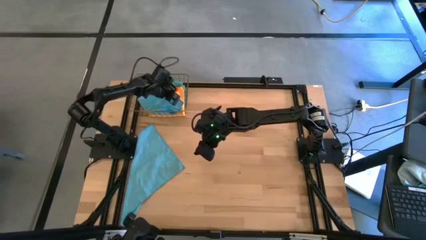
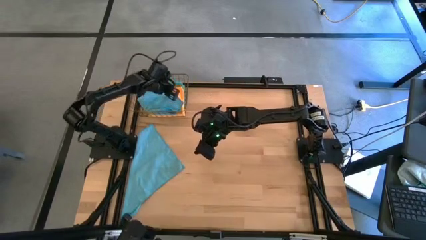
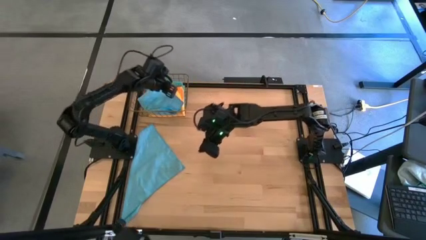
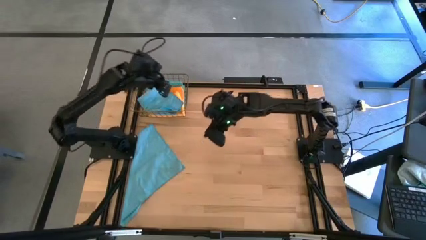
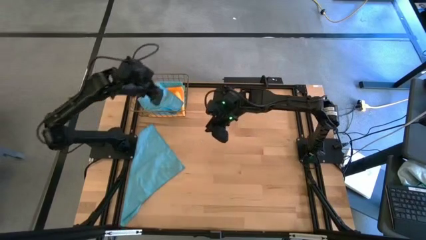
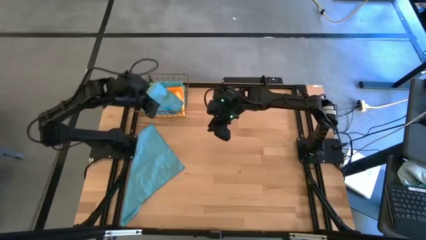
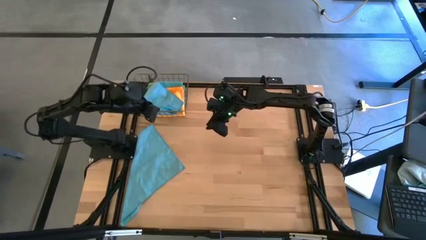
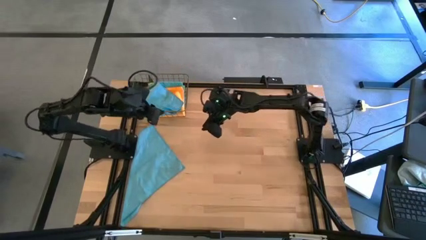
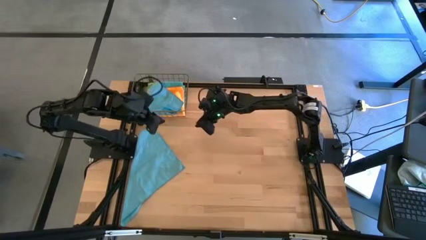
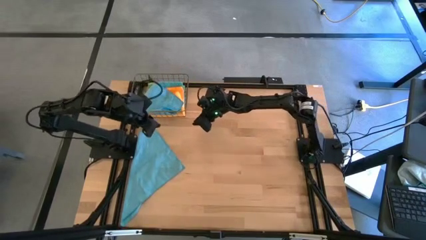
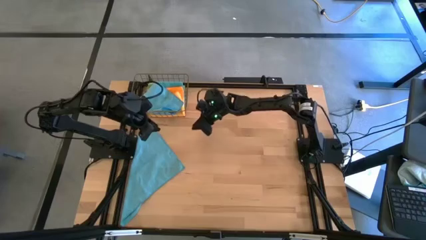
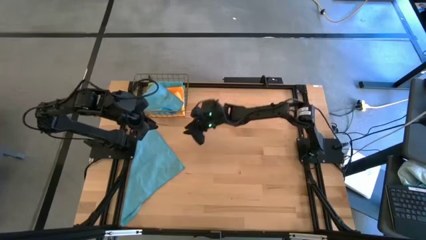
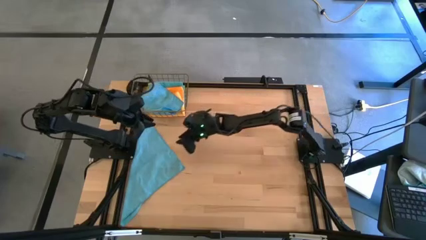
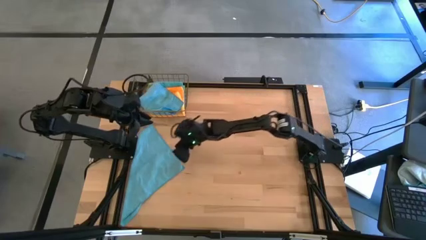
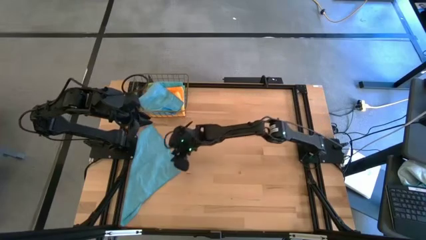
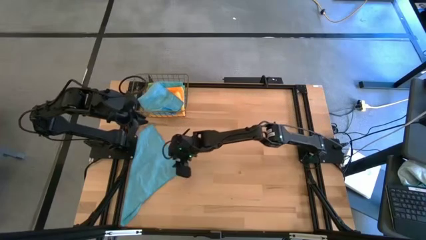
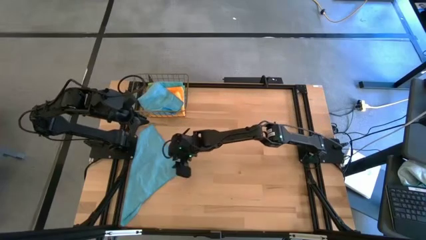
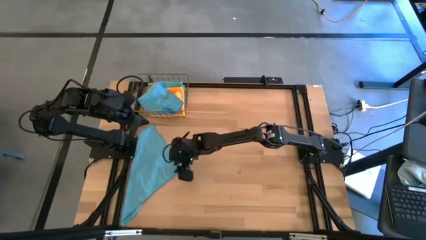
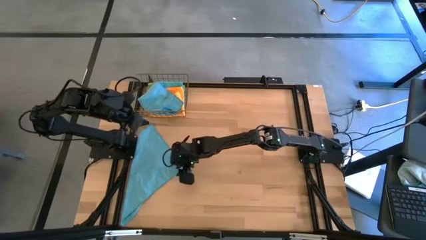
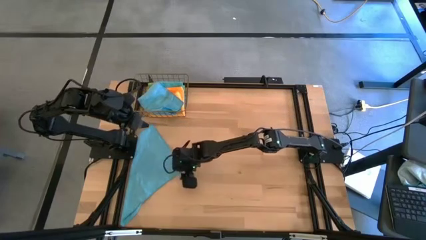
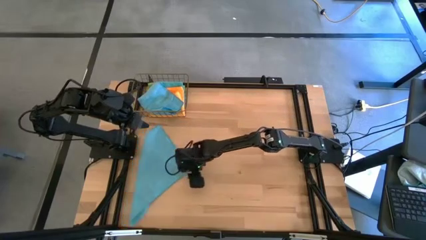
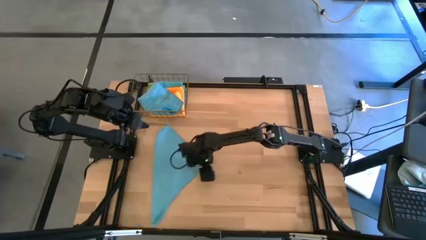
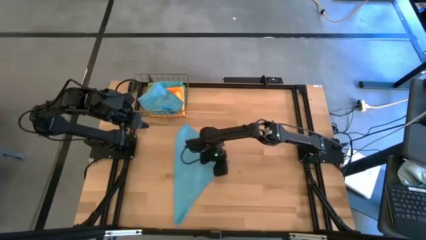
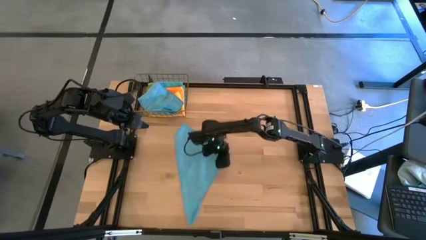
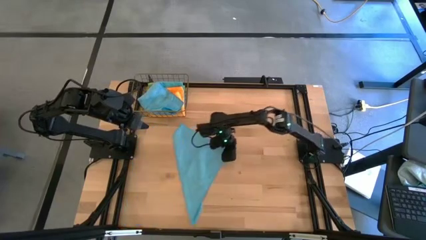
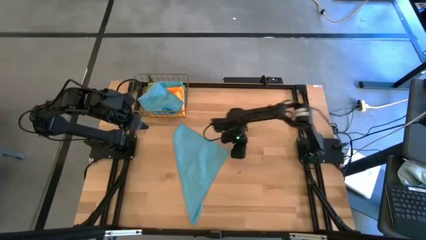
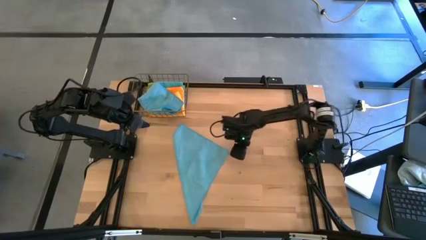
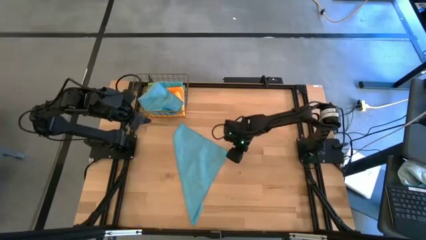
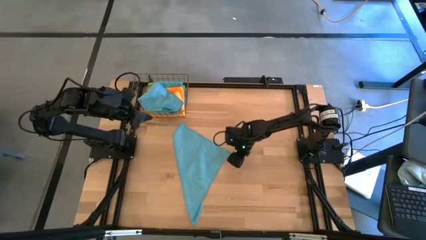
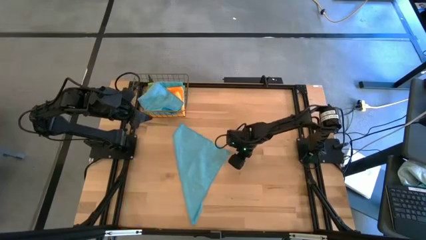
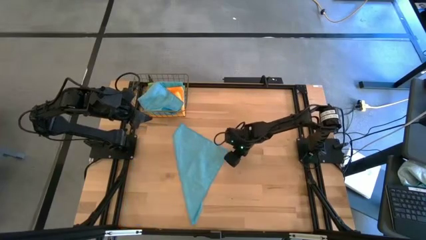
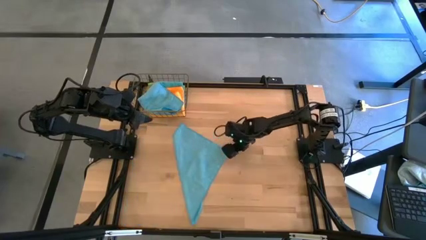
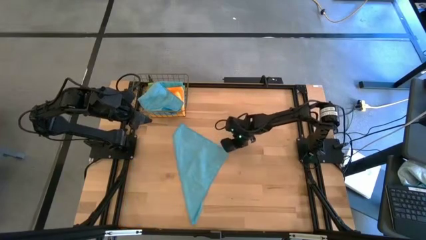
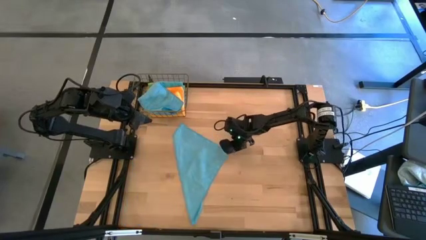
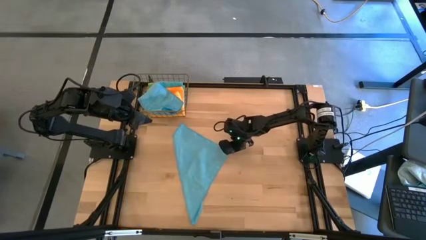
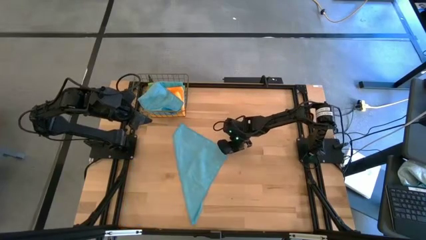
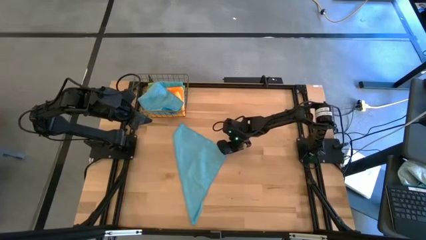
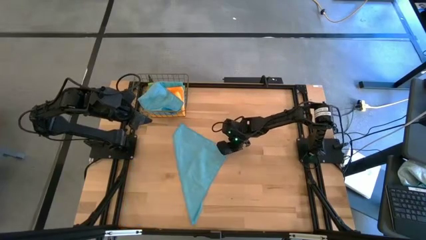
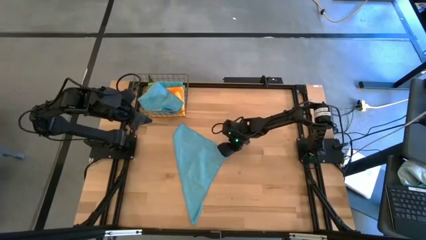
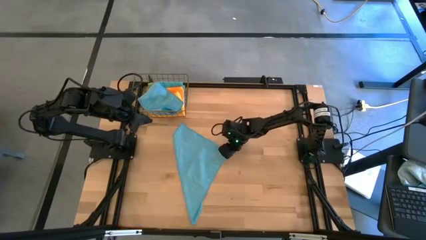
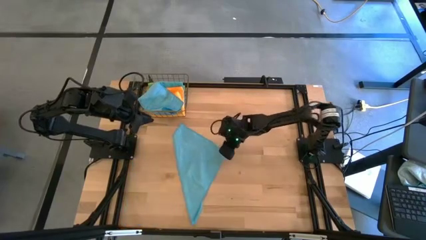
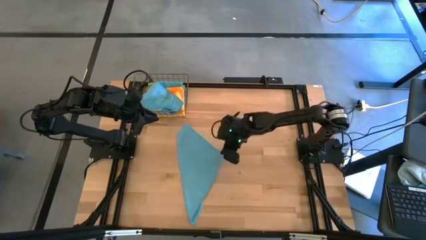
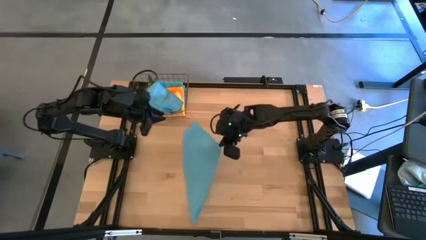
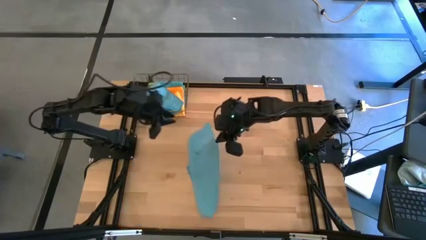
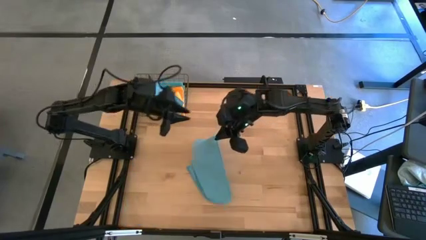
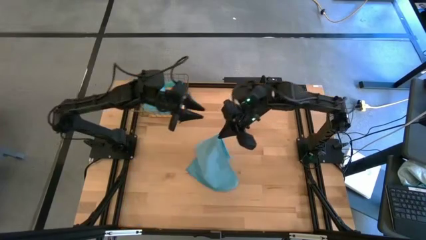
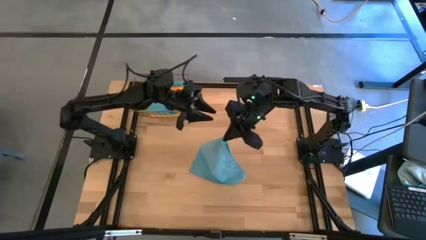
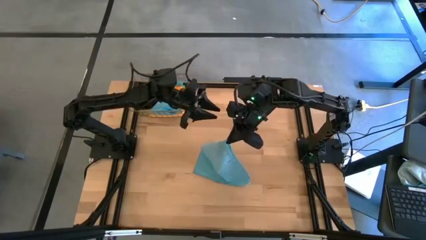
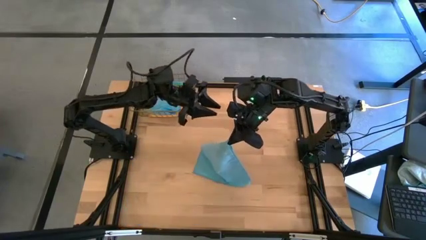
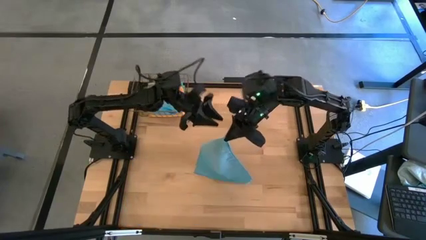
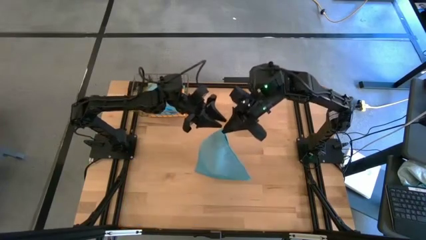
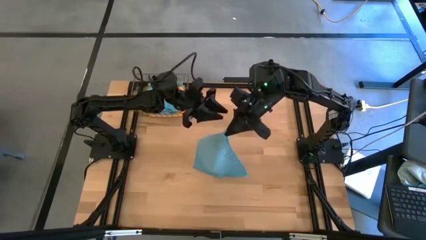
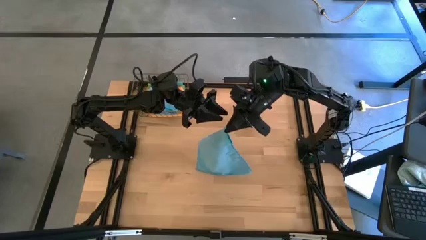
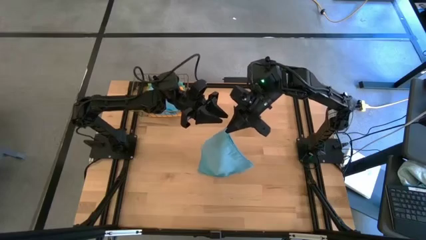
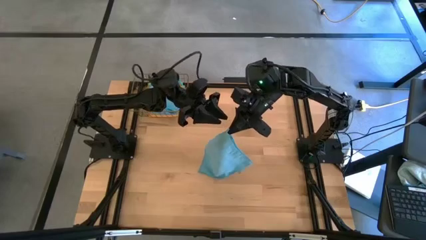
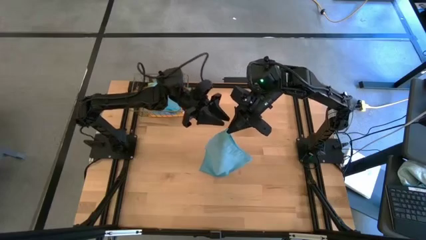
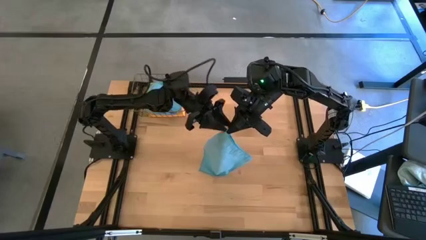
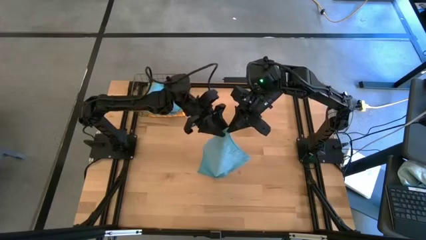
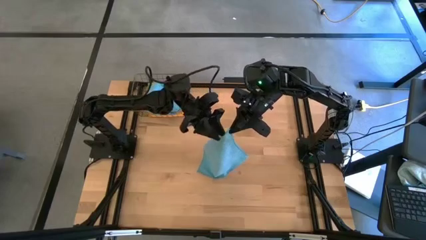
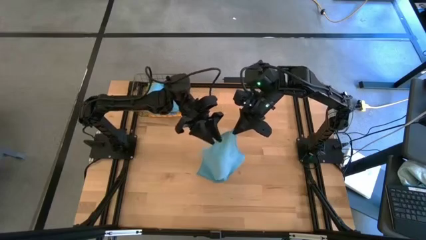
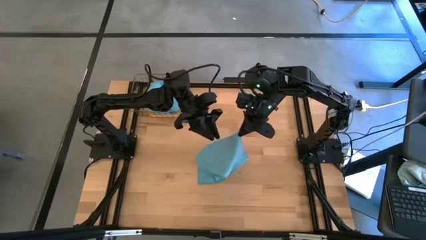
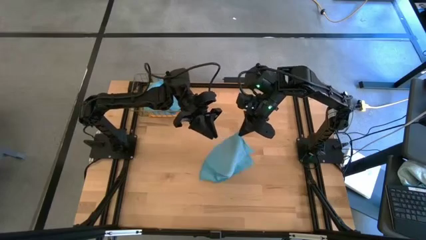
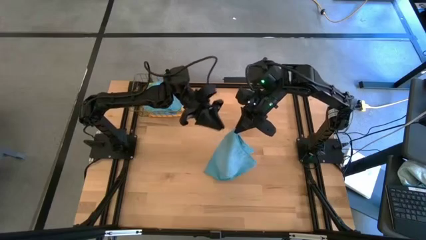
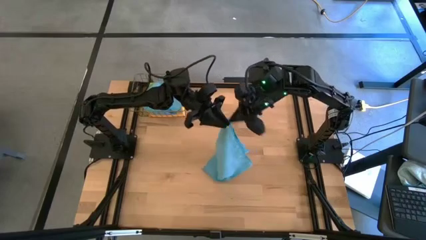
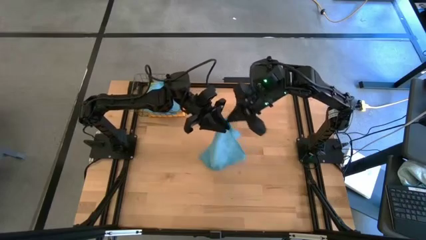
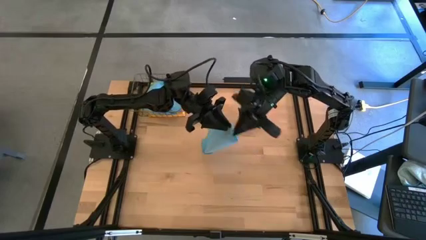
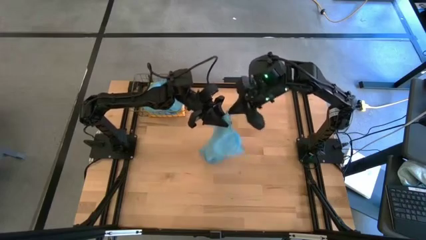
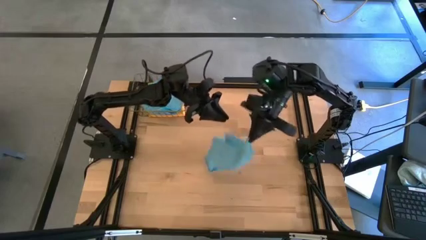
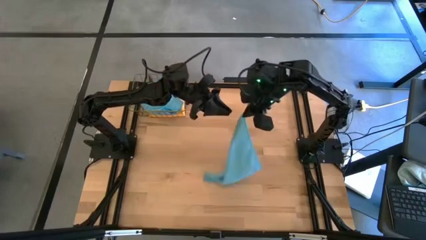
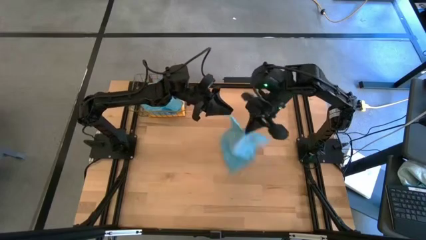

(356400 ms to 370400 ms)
Task: Fold microfiber towels
Fold the light blue microfiber cloth

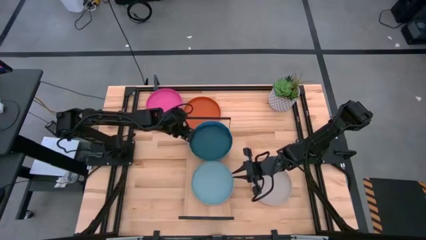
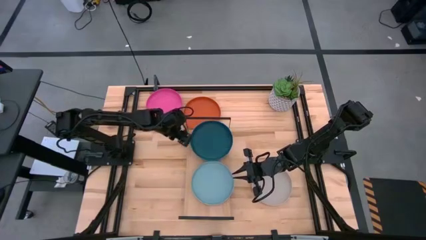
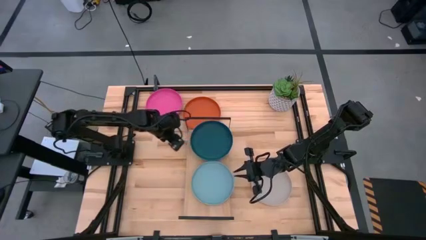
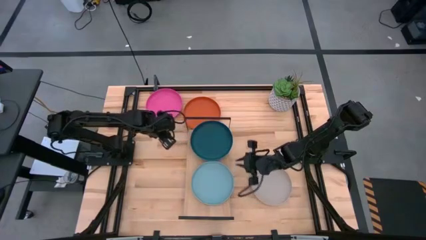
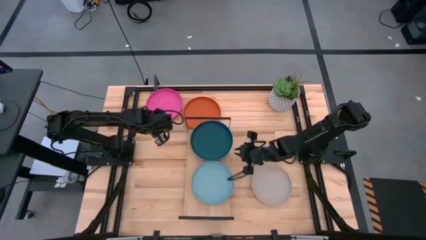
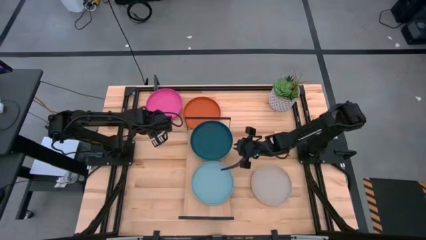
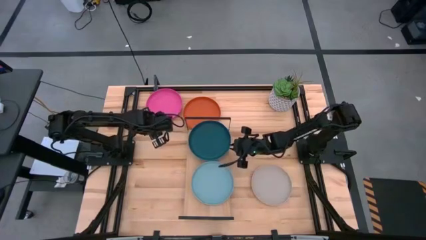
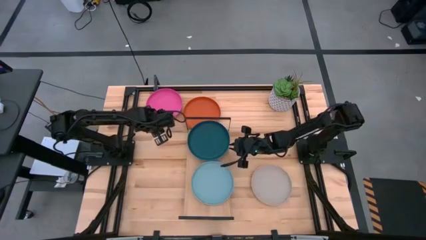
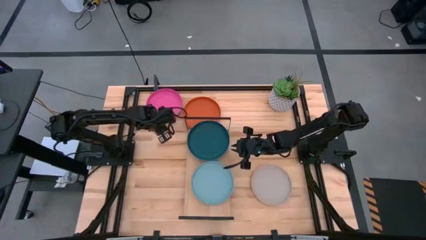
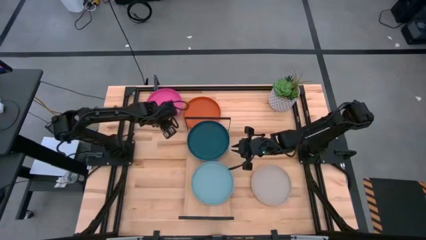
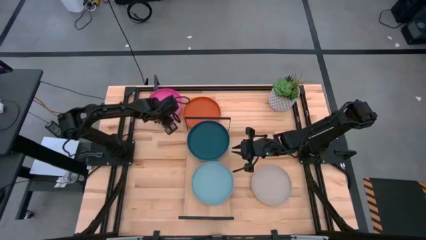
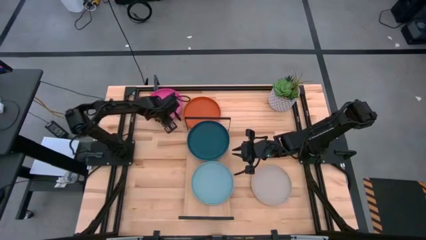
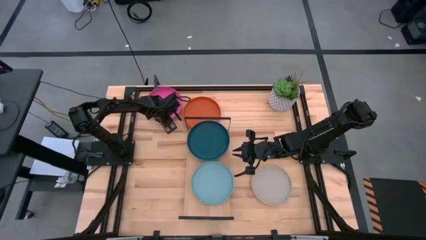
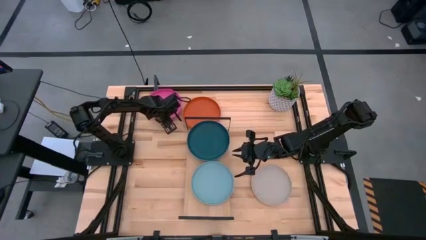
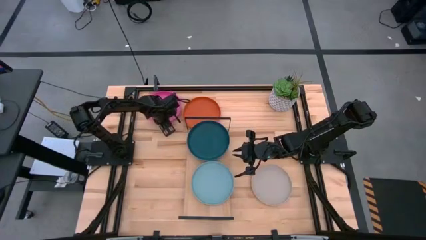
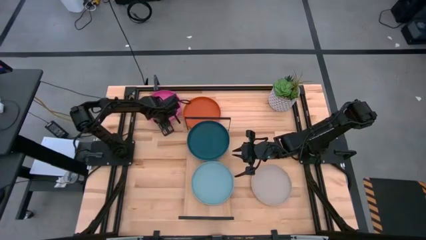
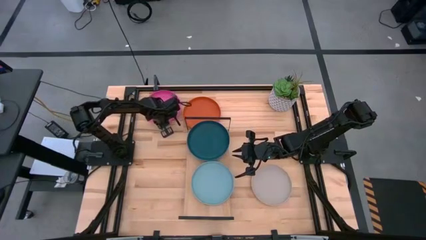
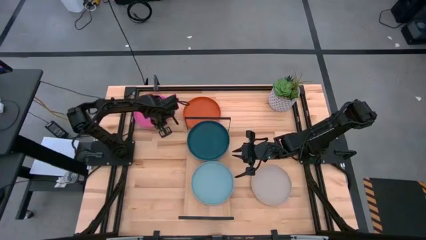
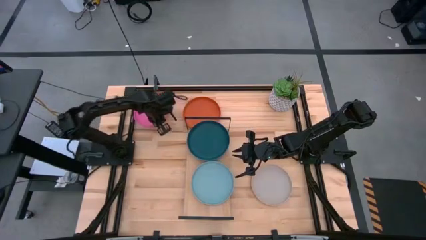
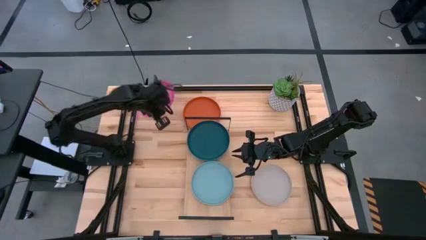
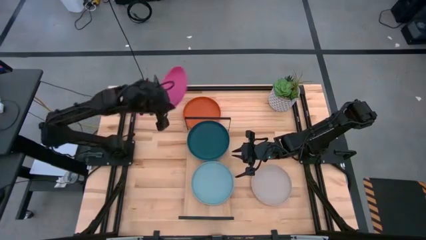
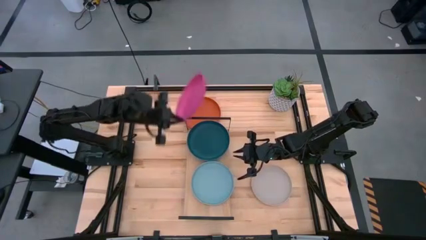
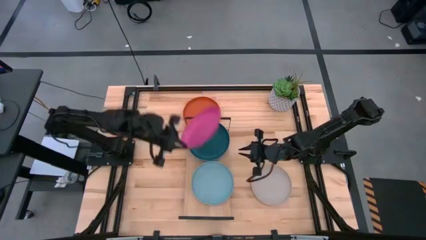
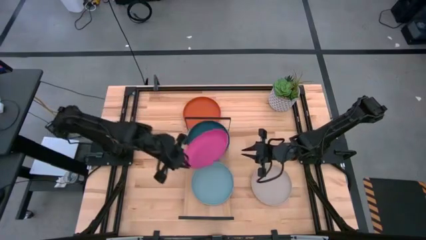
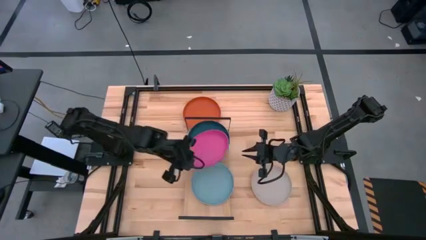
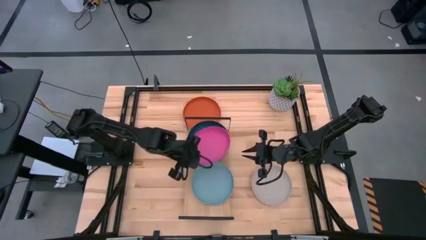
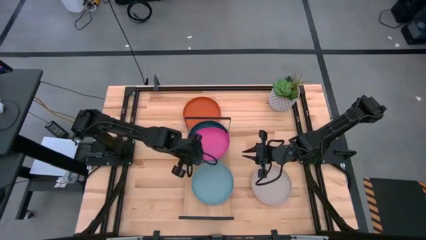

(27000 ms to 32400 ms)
Task: Place and stack plates onto a shelf
Stackt the pink plate on top of the dark blue plate
